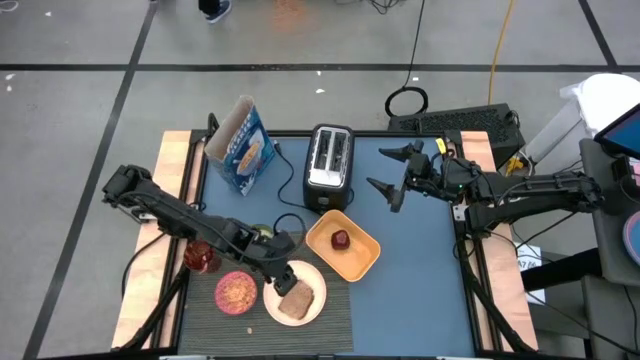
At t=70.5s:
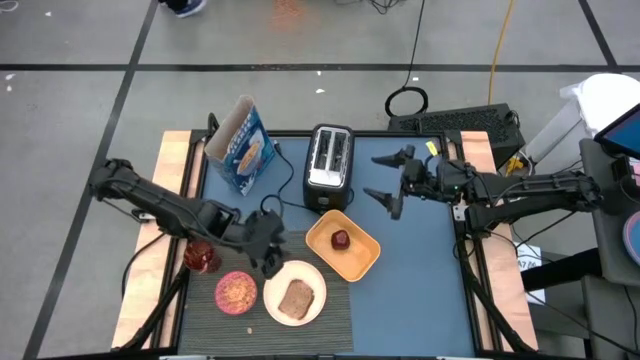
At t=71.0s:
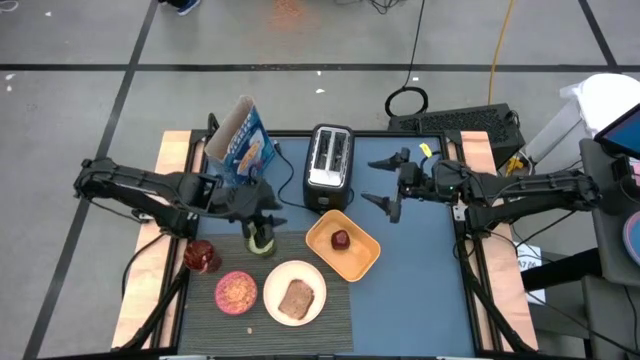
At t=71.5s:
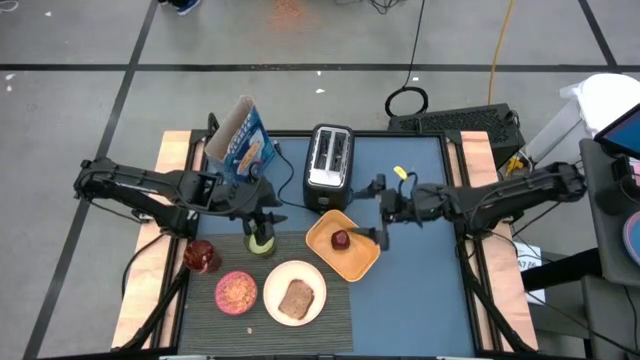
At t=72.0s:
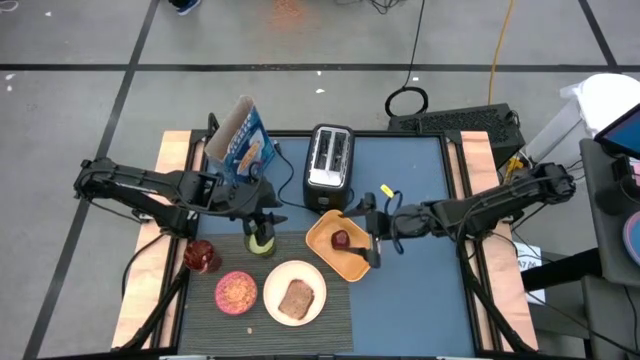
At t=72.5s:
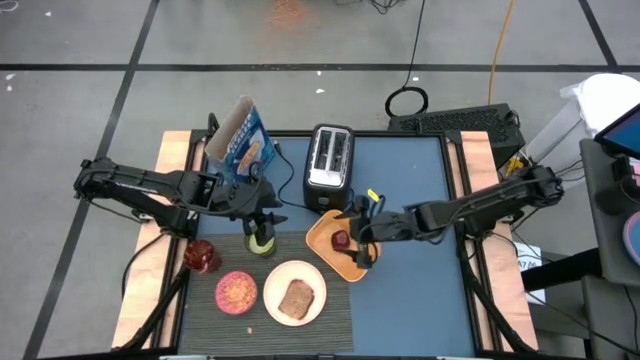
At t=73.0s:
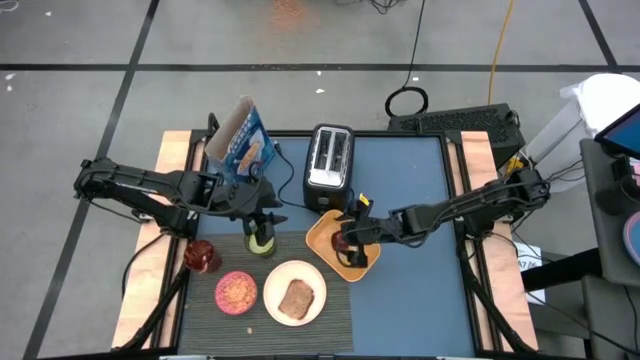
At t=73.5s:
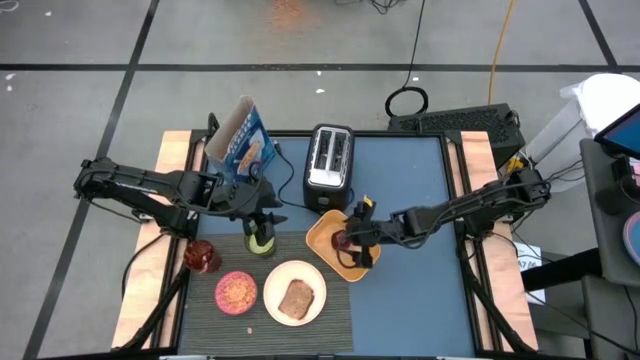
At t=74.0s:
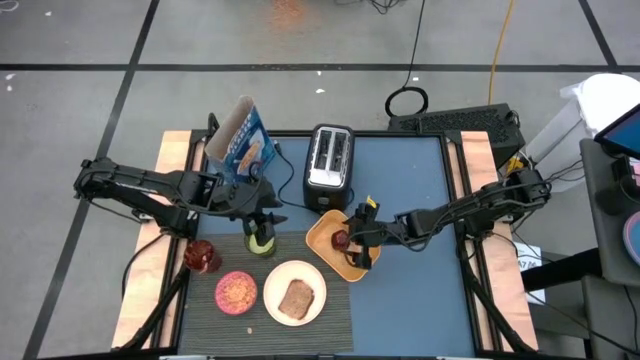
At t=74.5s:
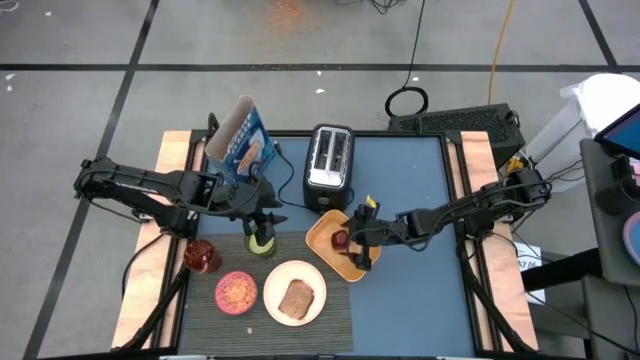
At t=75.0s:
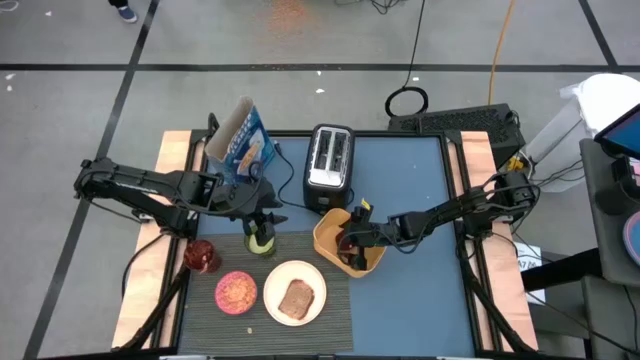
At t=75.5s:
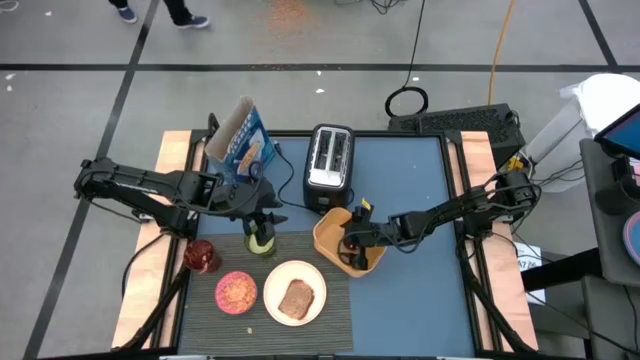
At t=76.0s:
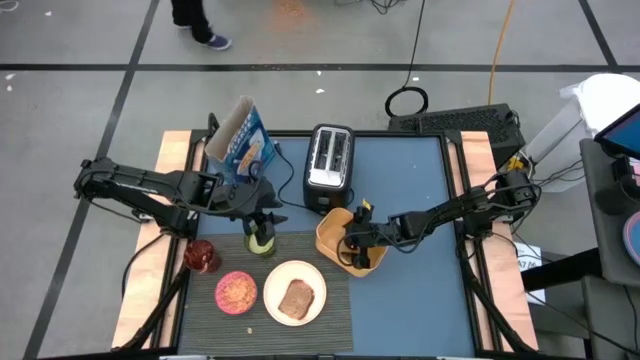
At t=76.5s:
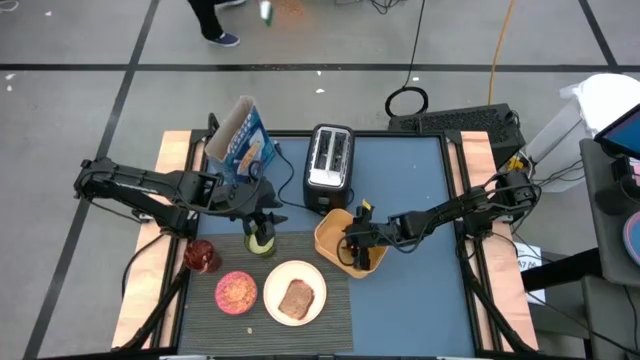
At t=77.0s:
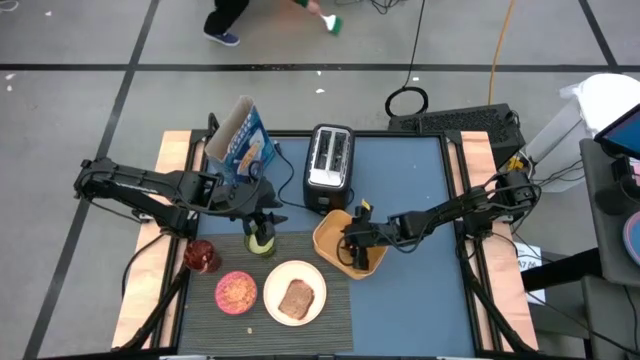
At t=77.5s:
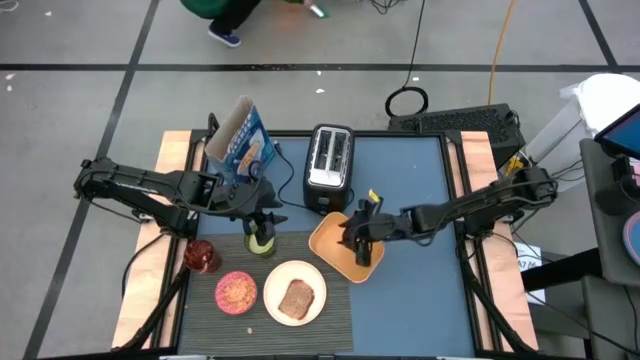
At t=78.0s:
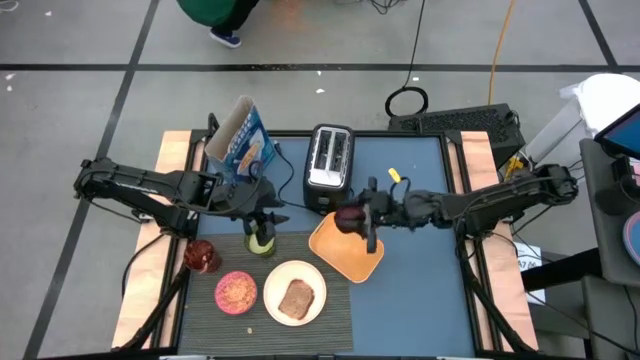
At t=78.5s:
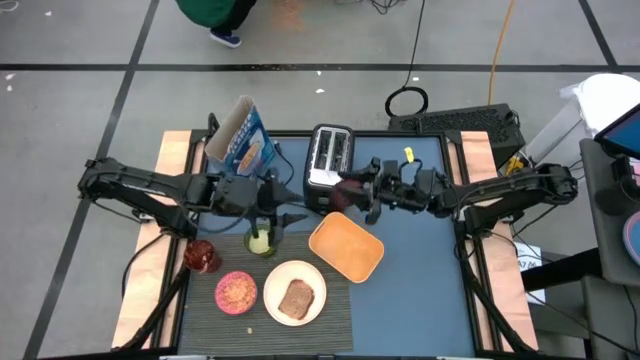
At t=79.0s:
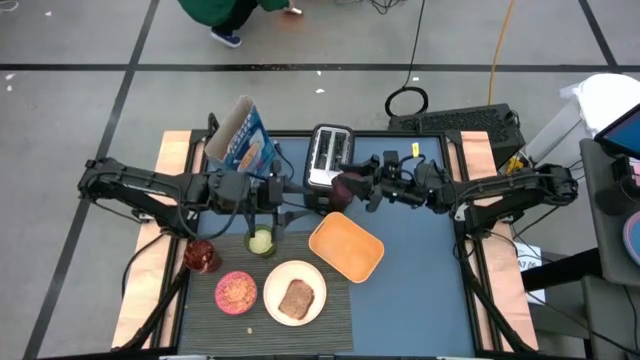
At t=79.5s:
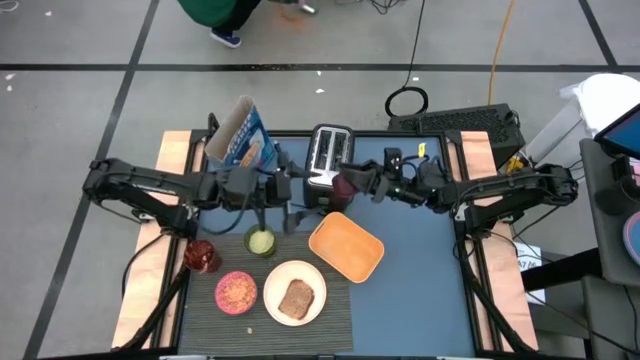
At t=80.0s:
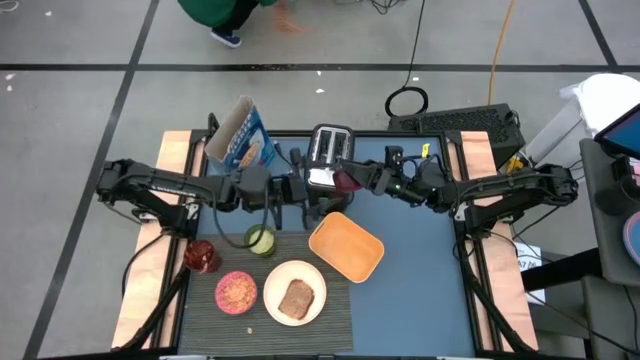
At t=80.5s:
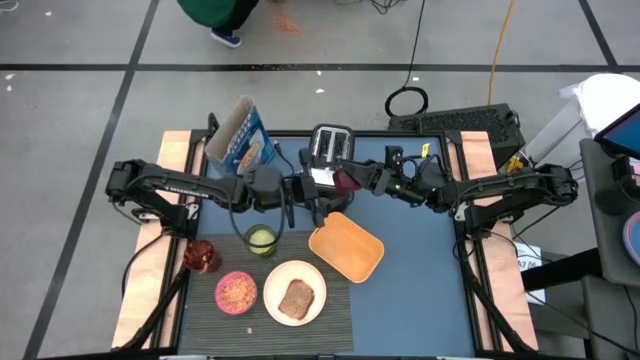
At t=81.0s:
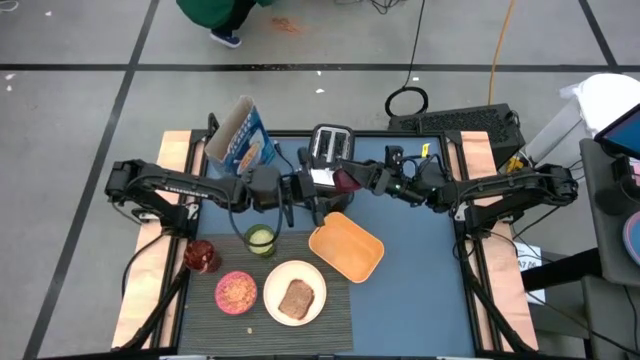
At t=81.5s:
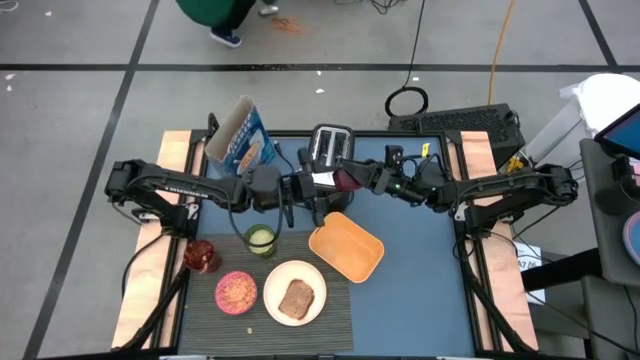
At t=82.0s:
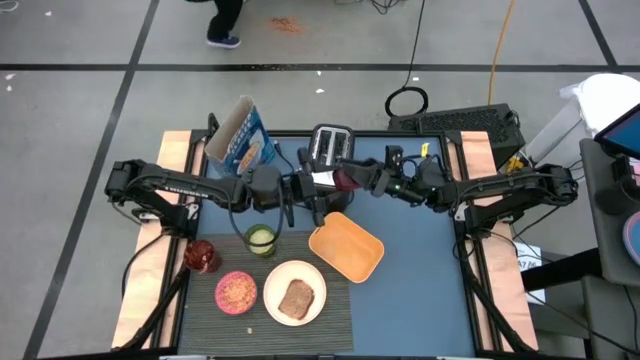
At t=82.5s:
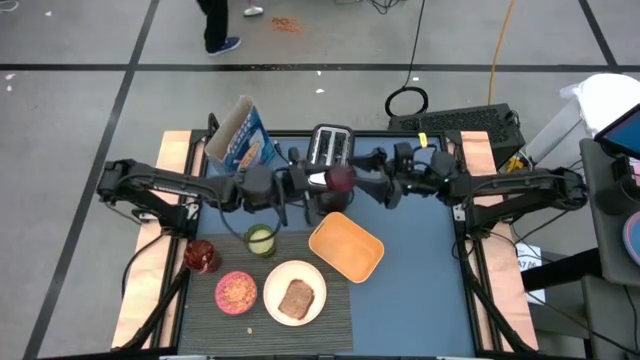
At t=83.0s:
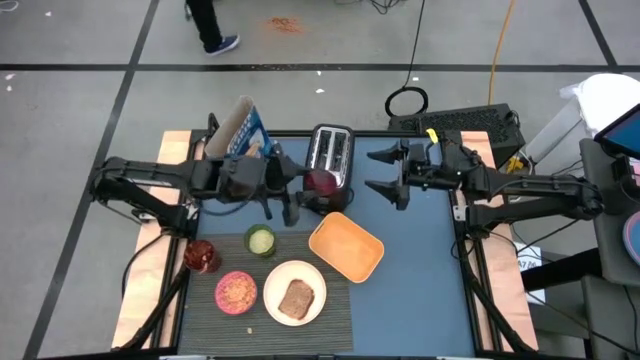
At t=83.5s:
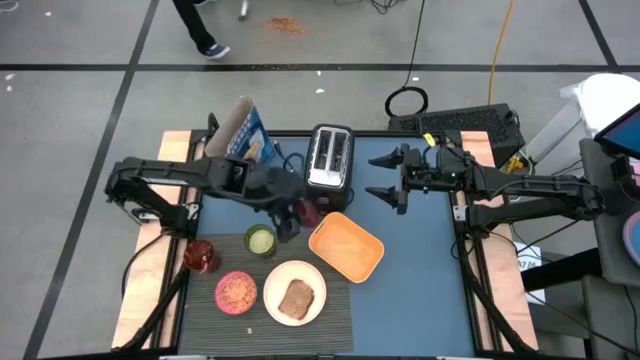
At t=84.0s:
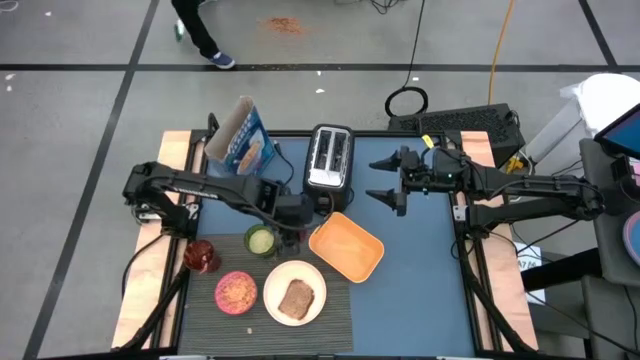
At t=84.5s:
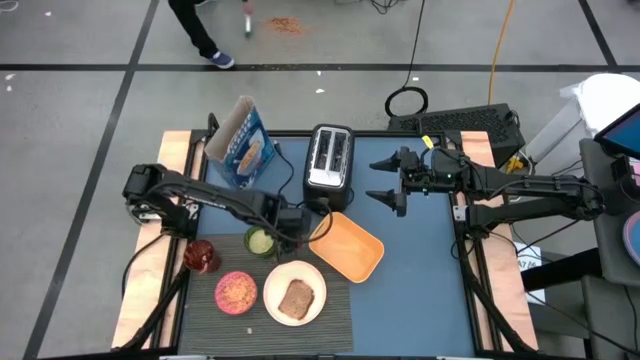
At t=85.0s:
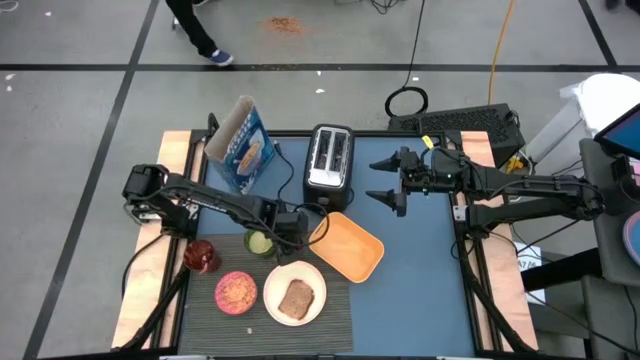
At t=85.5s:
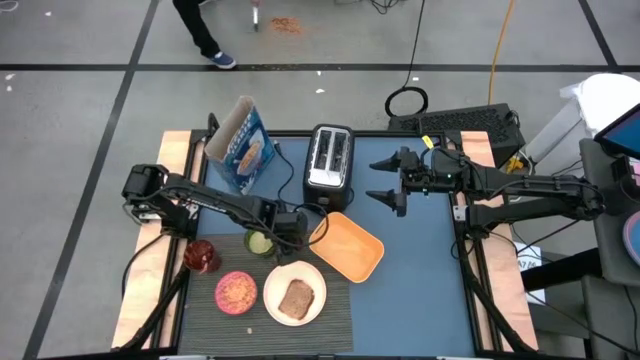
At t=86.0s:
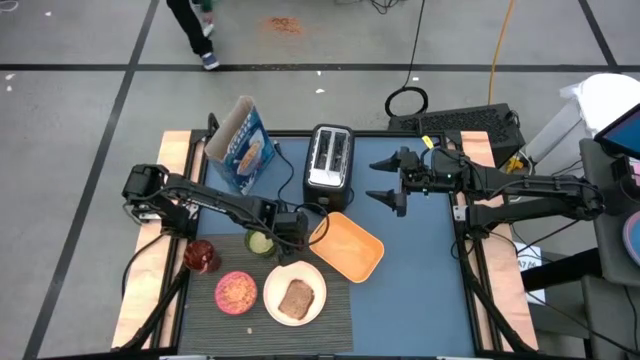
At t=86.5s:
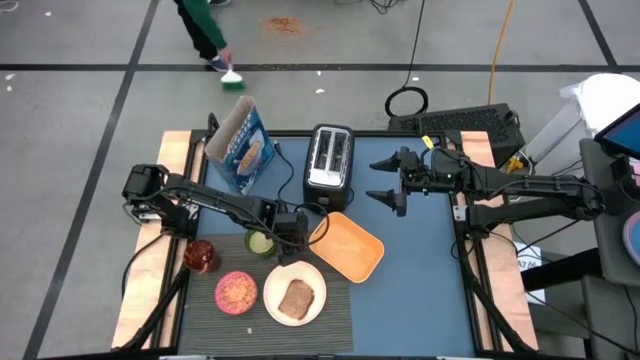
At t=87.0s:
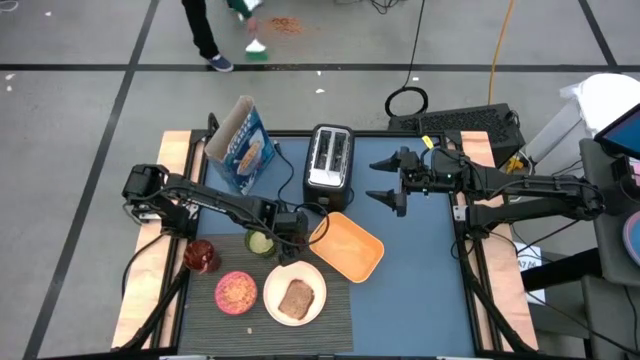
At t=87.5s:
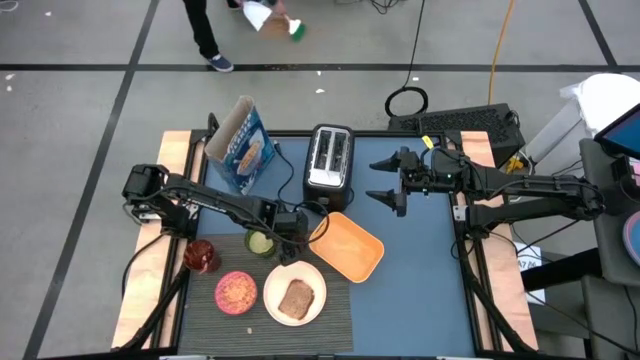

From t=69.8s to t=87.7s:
Task: Arrange a breakfast setting
Put the apple on the gray table mat to the top of the light orange plate

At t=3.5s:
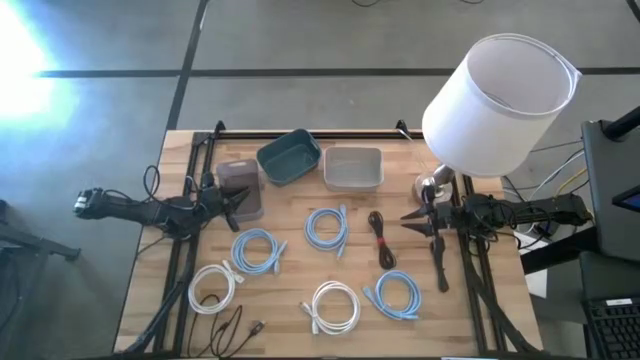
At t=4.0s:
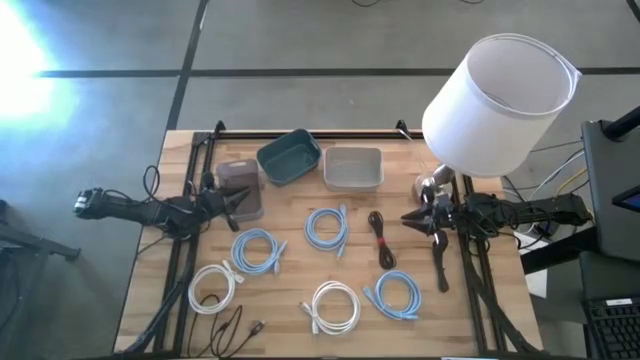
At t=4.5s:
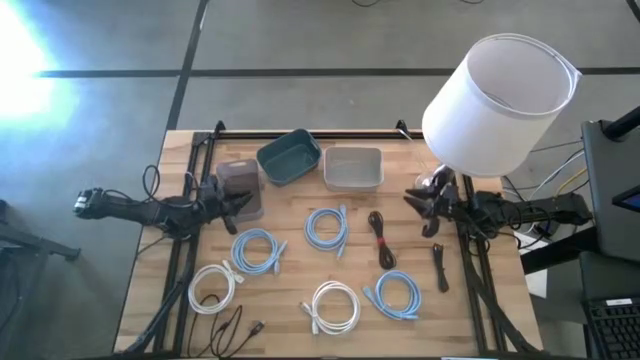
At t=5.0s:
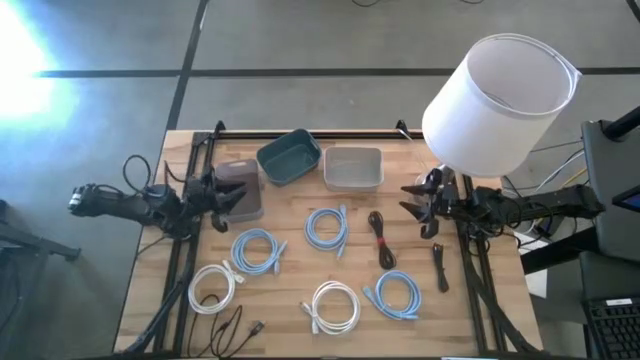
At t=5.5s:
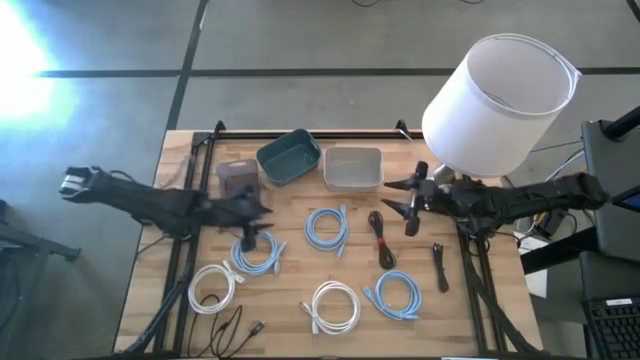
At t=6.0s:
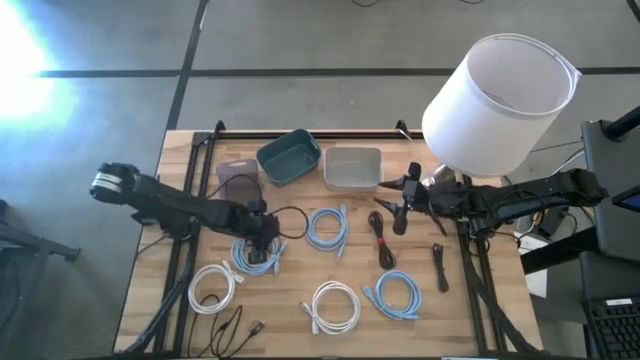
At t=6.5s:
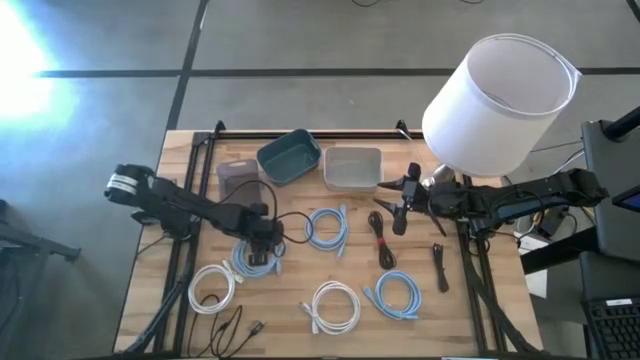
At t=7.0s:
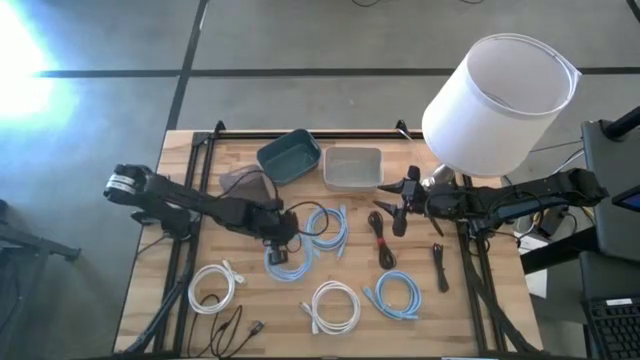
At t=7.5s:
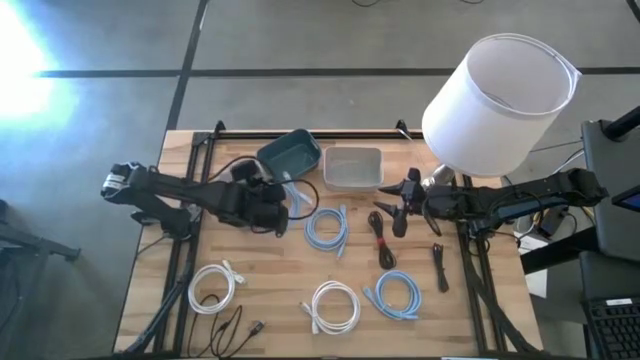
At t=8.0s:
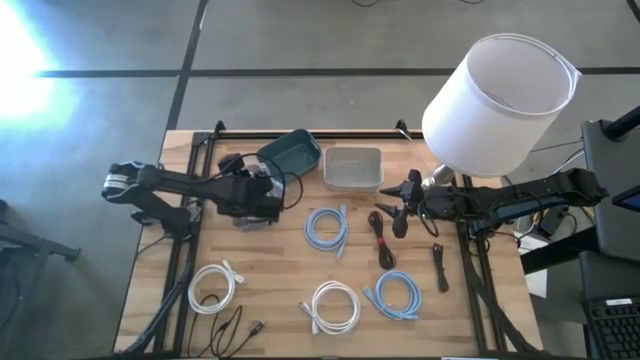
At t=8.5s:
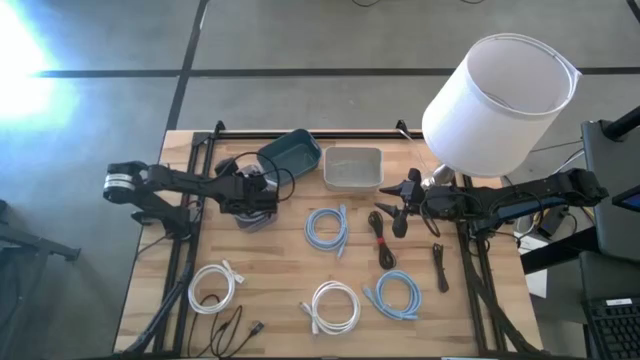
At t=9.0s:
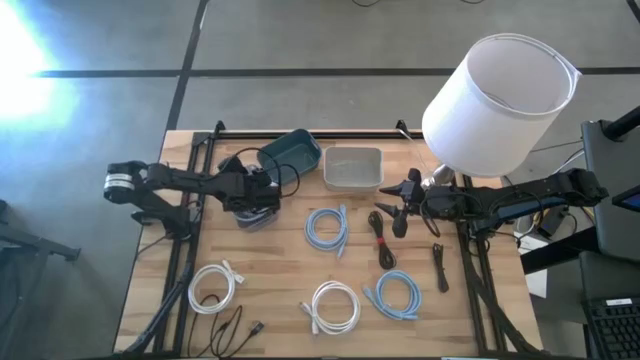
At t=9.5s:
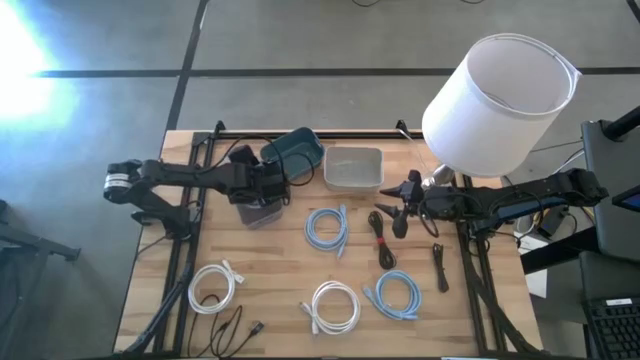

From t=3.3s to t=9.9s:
Task: Pick & Place USB Port
Put the top left blue HDMI cable into the gray bin
